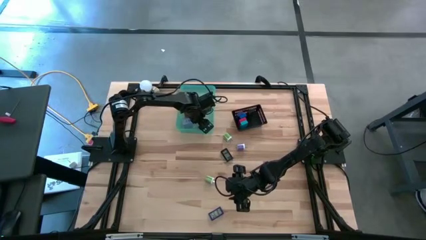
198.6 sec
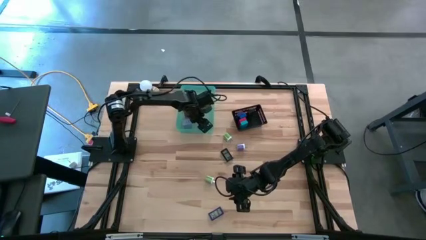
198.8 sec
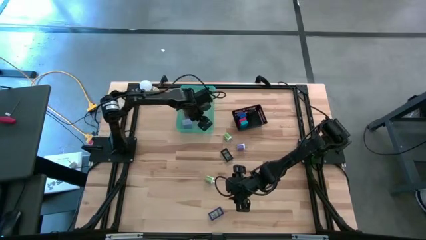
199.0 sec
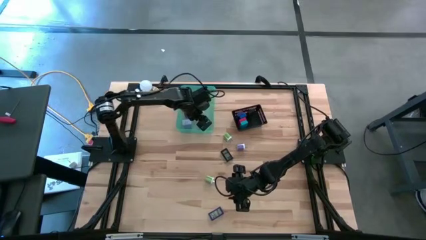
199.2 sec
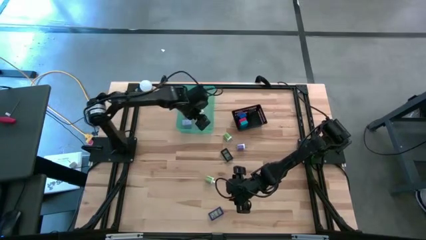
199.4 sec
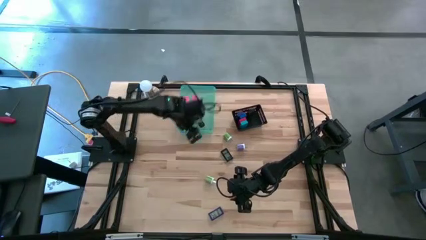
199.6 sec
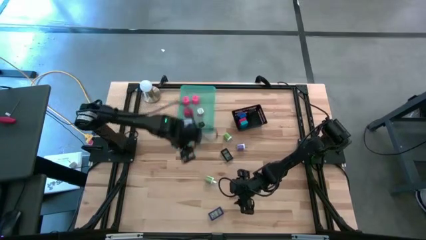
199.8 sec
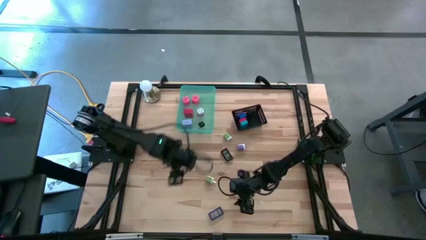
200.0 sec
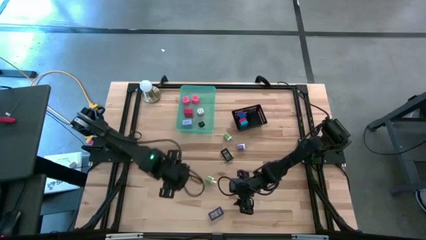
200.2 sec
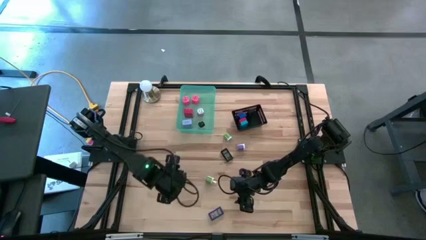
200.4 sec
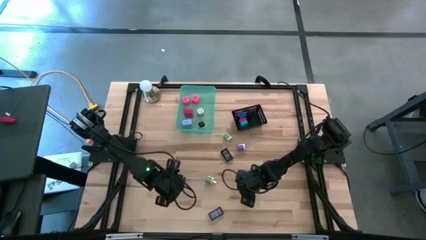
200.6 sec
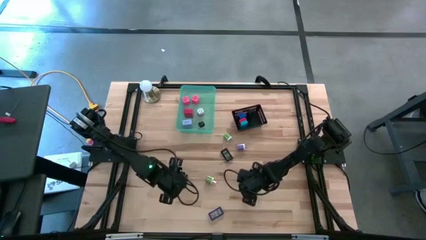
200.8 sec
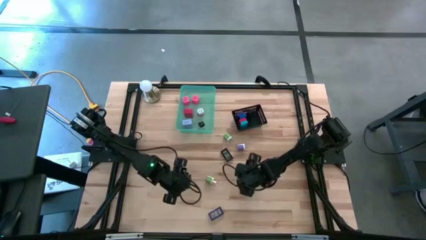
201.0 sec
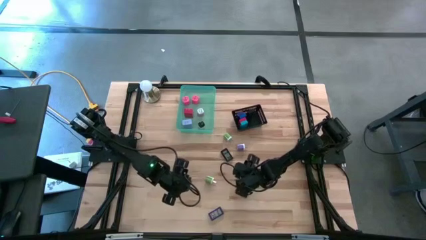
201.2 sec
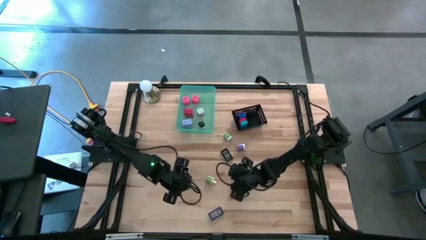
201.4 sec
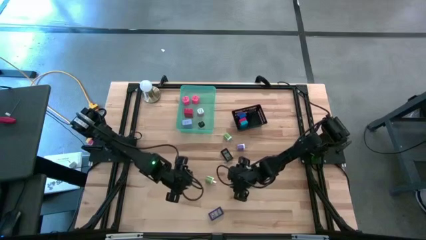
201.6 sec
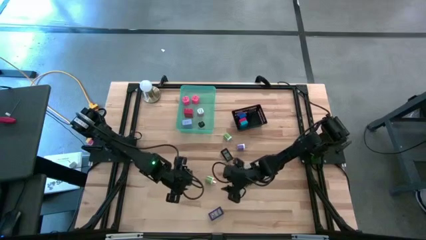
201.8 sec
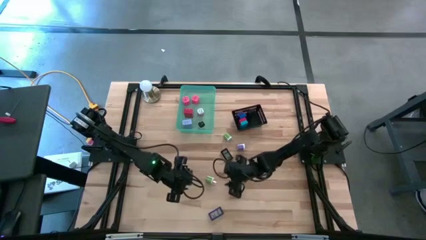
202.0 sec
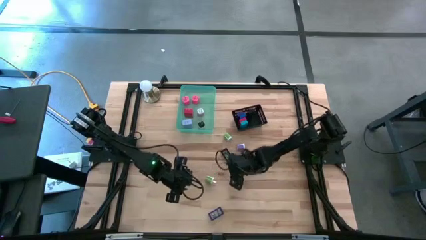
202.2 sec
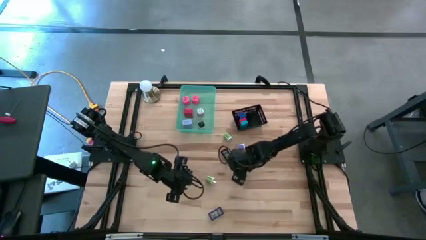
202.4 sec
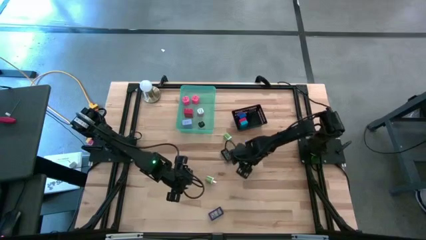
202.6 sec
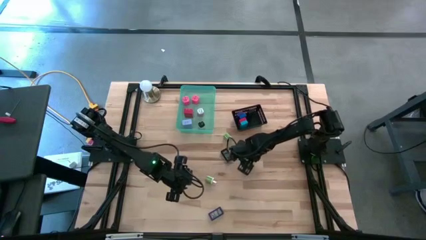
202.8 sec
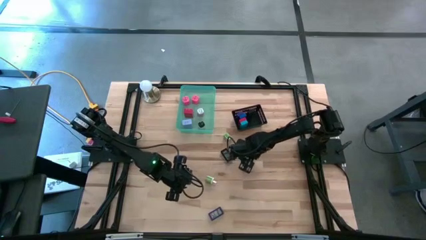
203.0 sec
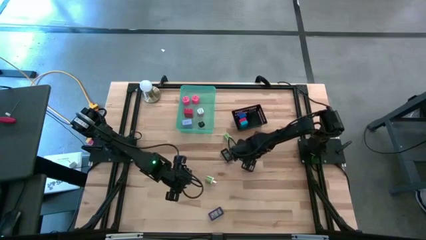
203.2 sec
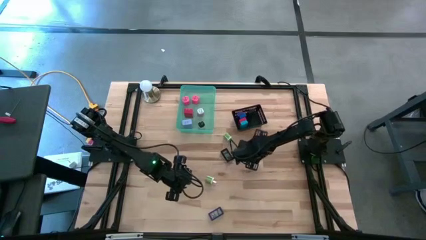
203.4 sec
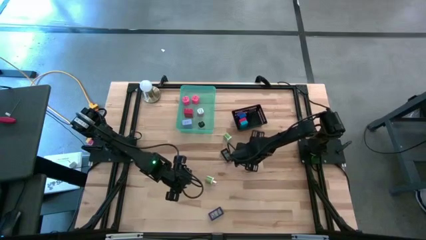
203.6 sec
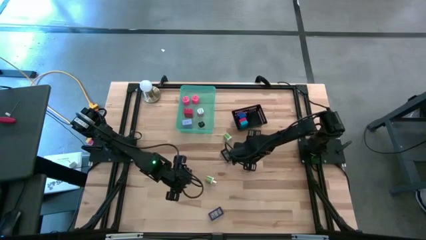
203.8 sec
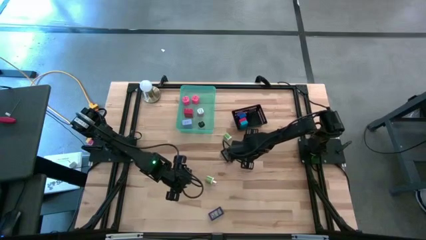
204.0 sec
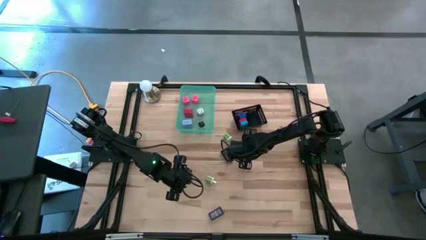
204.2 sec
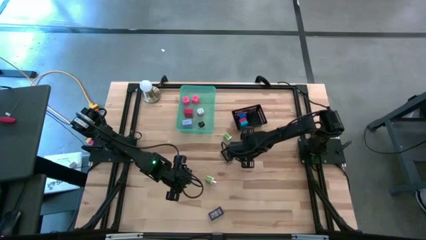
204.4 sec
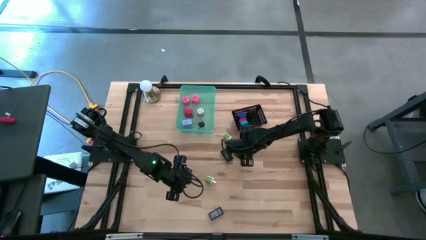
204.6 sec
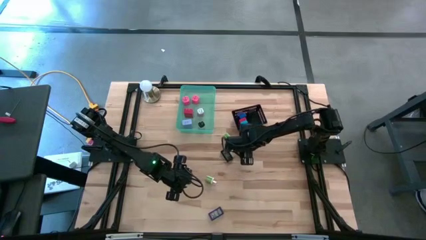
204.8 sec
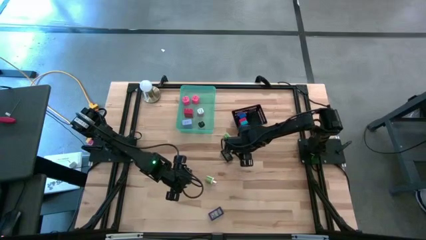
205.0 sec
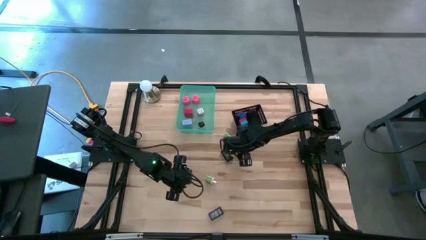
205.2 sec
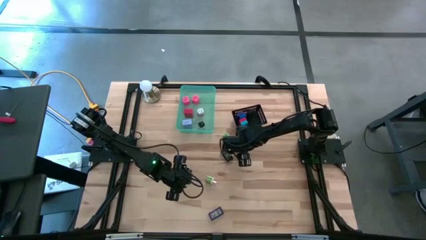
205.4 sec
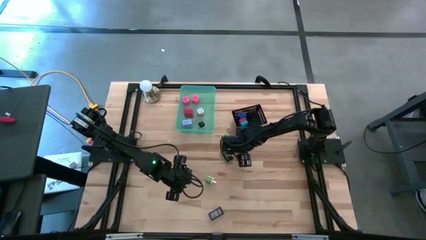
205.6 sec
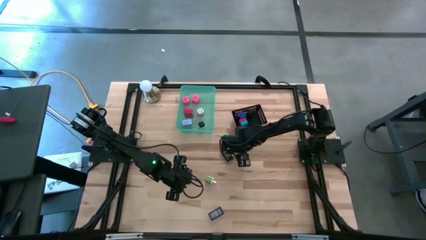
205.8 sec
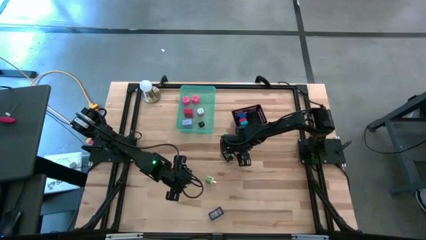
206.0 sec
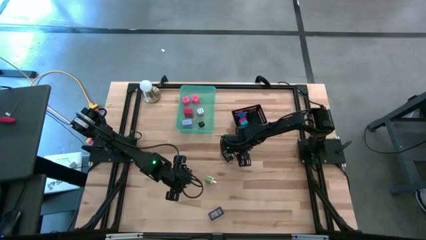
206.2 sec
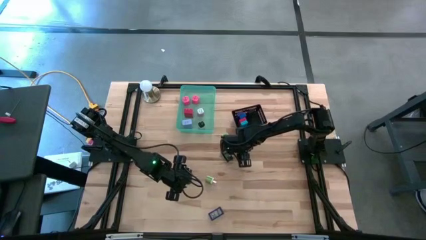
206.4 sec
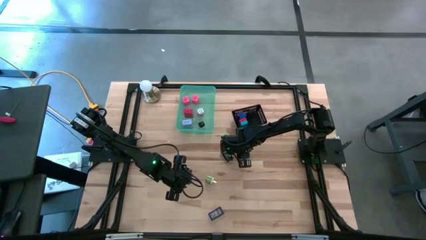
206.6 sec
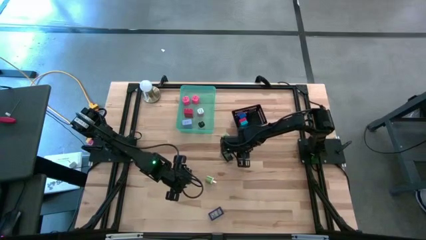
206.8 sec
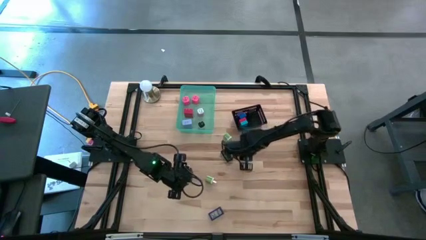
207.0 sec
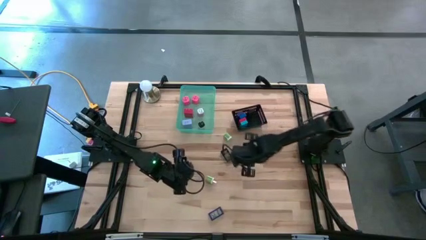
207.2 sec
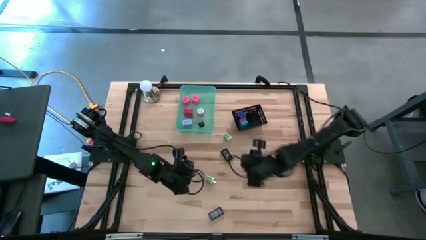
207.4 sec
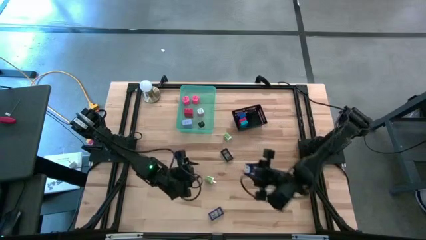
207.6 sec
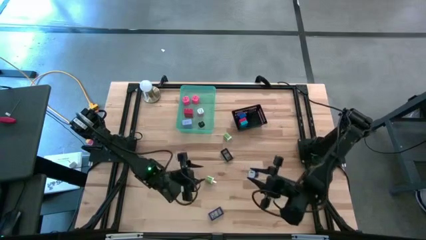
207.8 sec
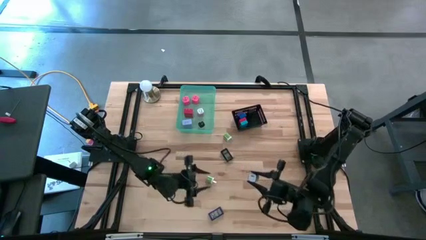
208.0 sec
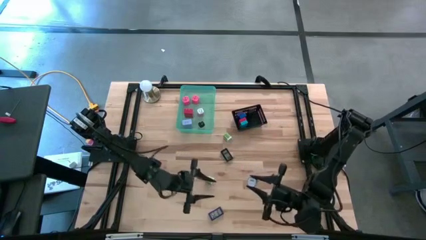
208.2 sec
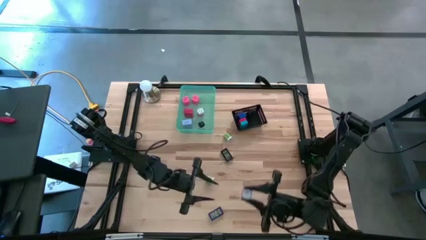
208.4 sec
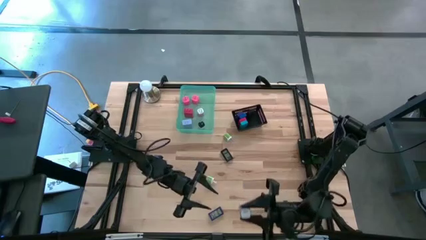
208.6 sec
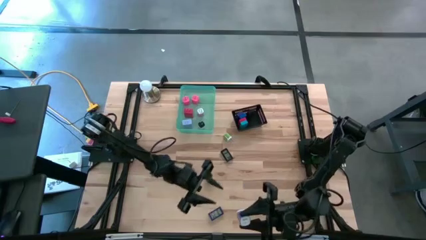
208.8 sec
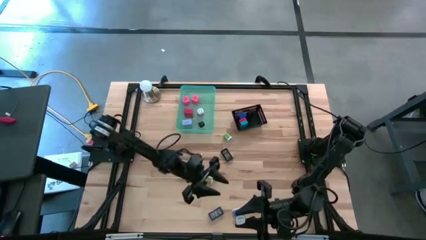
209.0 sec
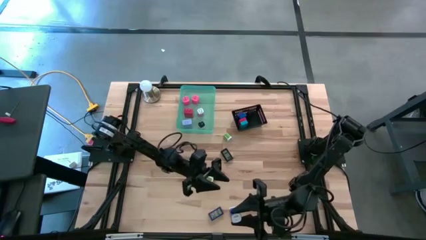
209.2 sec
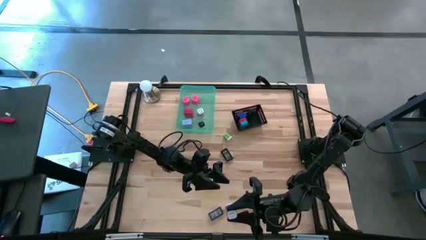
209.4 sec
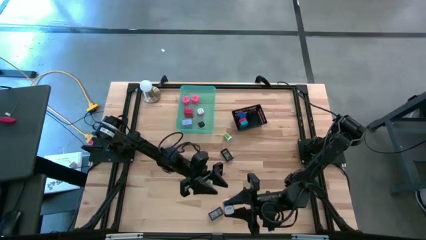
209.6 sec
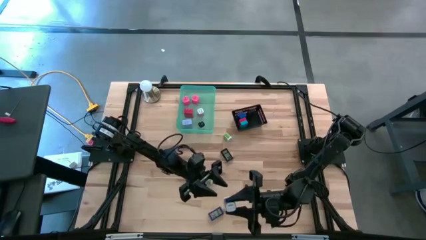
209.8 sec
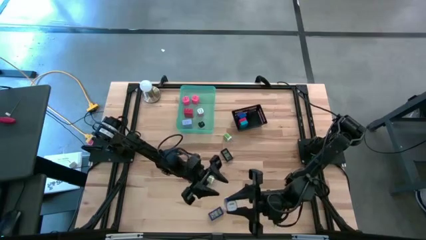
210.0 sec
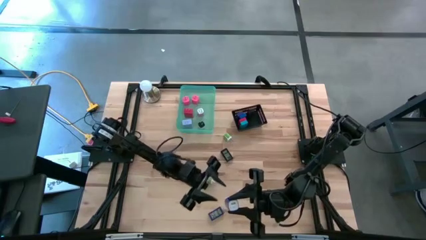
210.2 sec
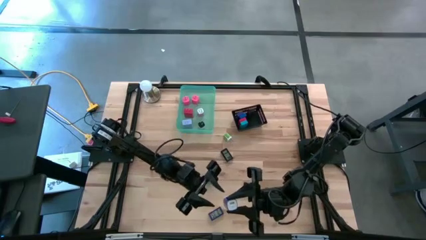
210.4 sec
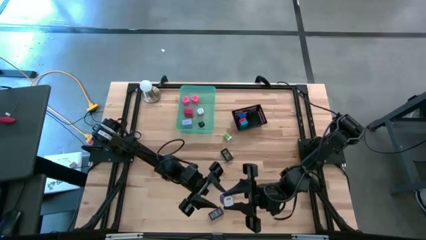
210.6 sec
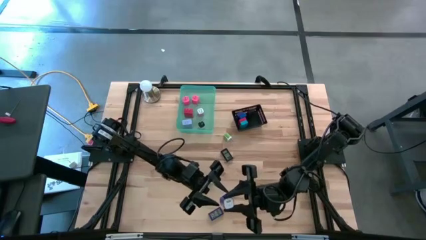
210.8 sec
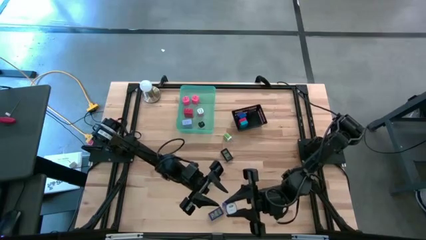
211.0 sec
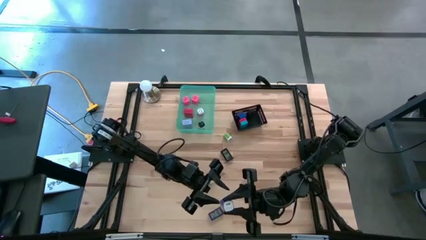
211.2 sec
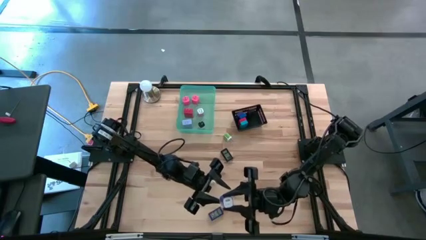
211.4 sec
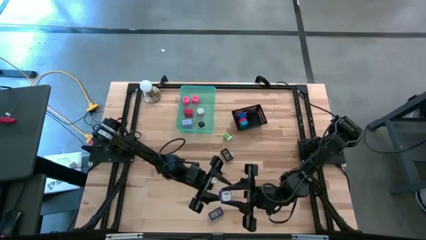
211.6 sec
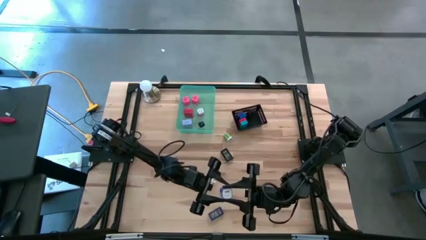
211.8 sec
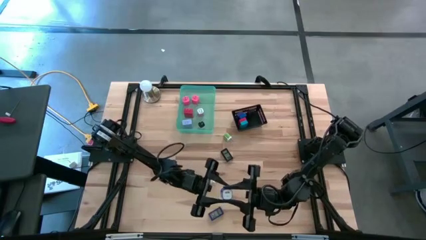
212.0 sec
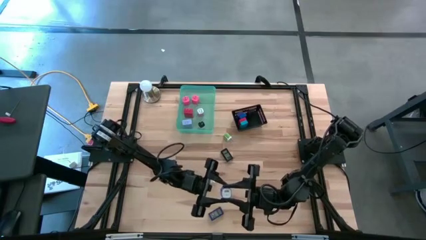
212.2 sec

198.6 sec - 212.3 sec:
Task: Pick & Place Office items
Put the purple charger adapter into the green bin

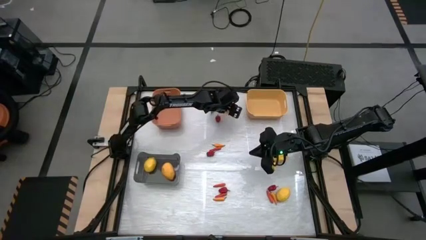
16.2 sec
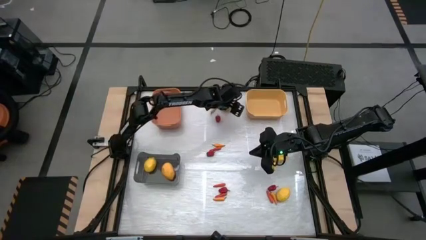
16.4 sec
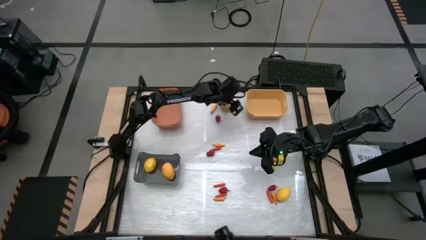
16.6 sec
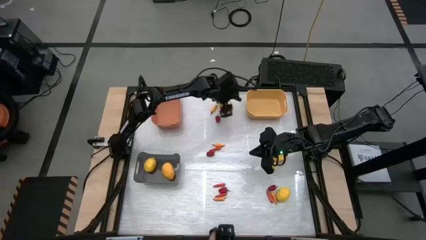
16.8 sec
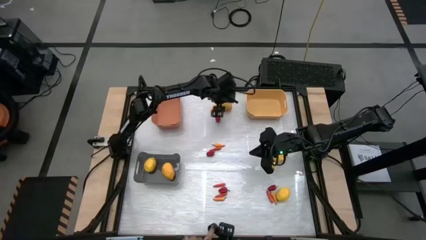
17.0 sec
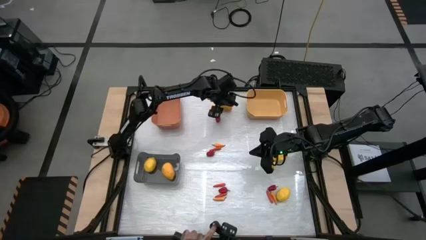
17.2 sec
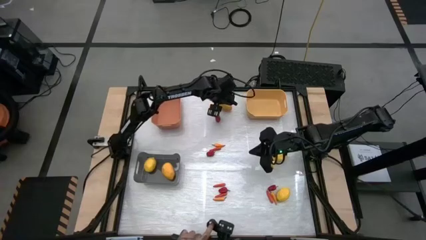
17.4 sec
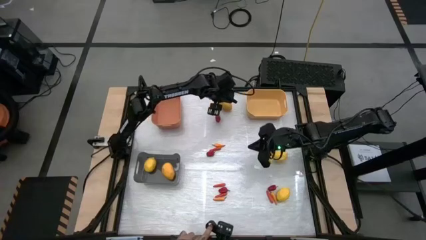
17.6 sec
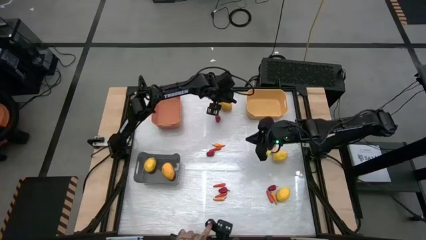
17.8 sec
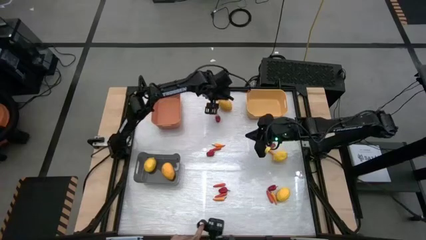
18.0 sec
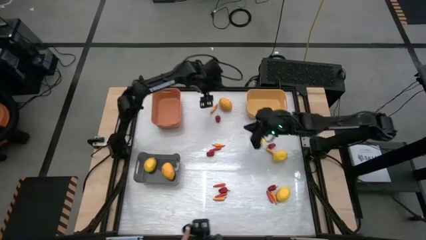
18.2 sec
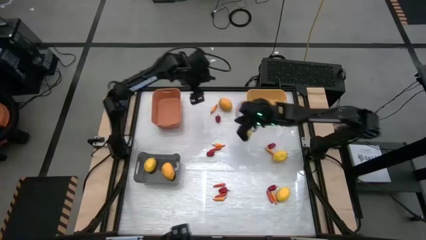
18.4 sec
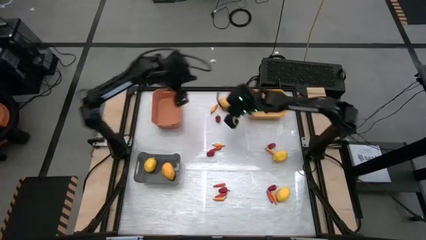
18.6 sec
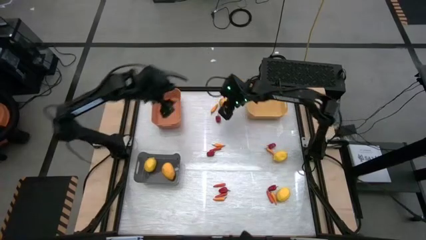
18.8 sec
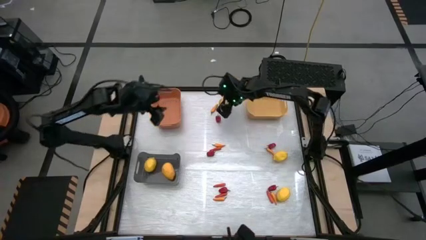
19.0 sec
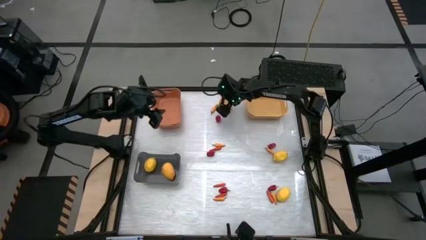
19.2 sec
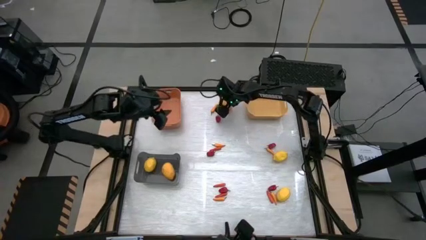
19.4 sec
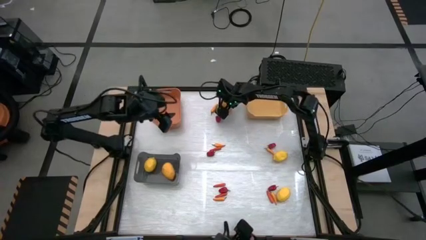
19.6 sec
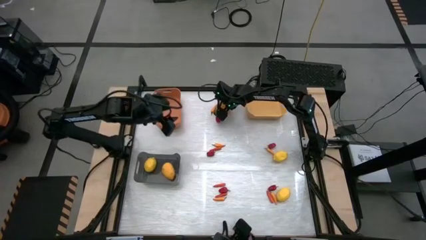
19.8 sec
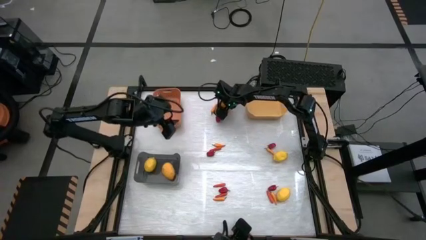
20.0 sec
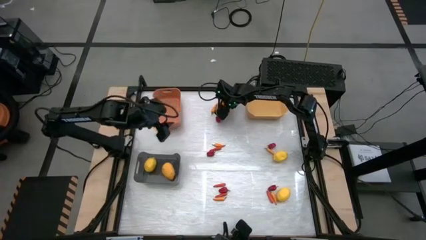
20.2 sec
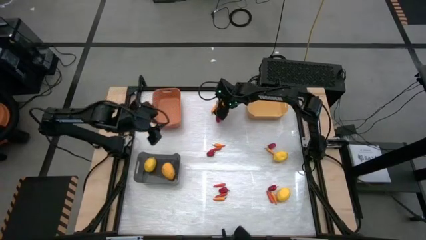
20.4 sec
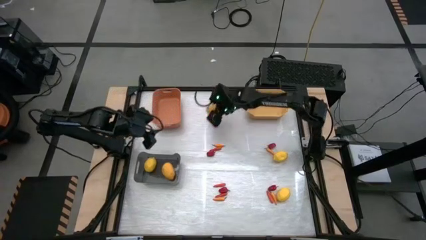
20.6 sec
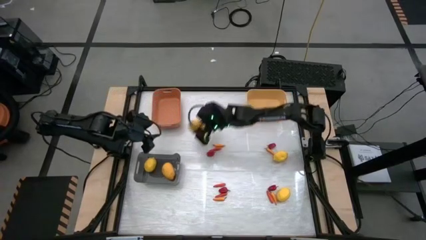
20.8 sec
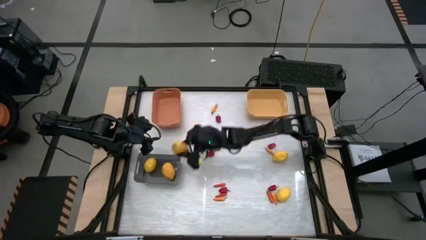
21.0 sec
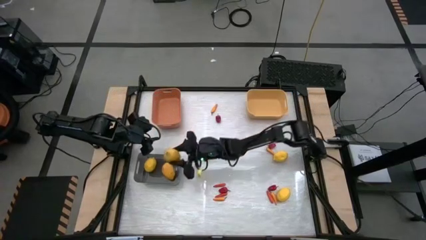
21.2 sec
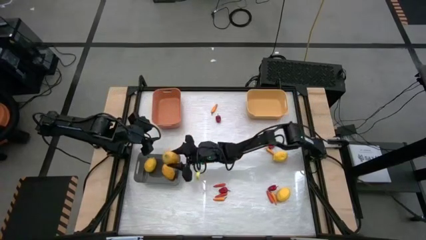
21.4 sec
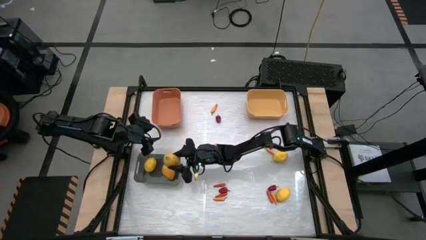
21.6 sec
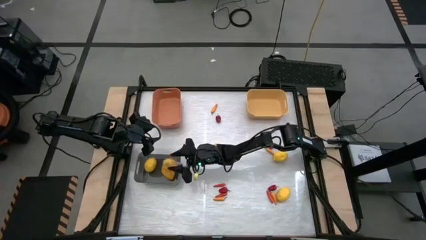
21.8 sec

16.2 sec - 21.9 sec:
Task: Sort produce into baskets
Put the yellow lemon into the black bin
